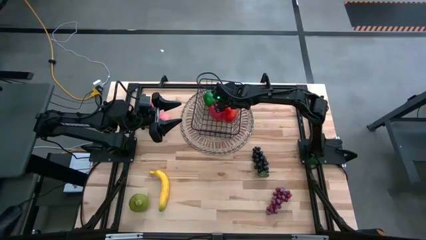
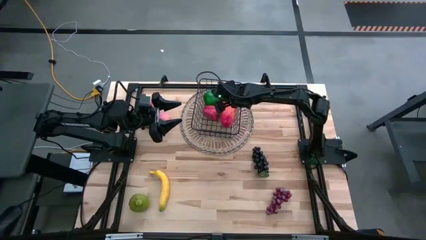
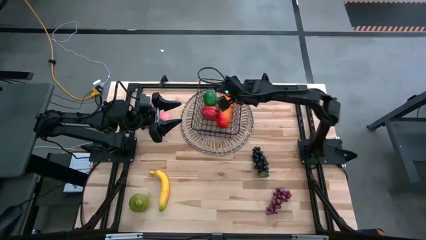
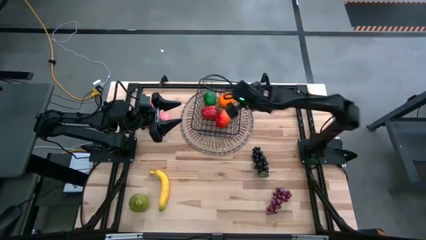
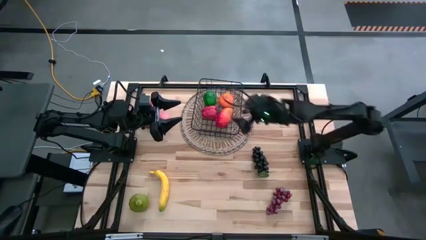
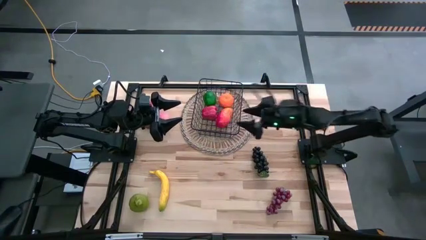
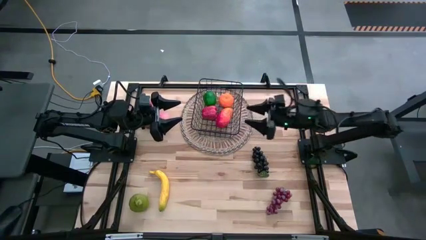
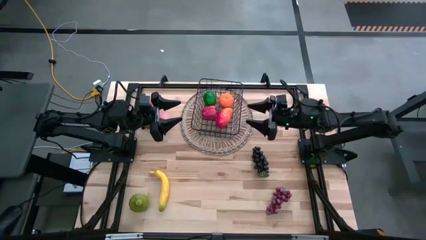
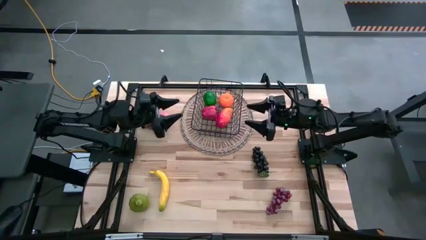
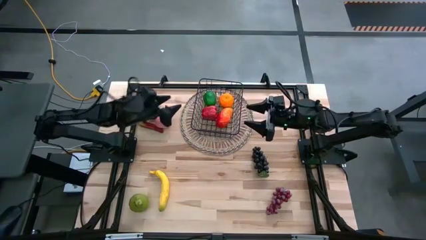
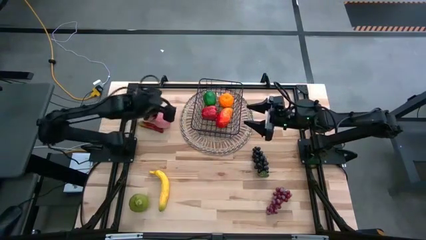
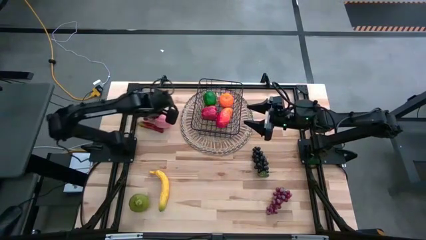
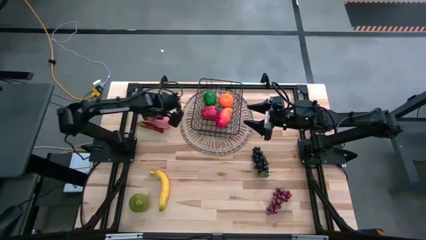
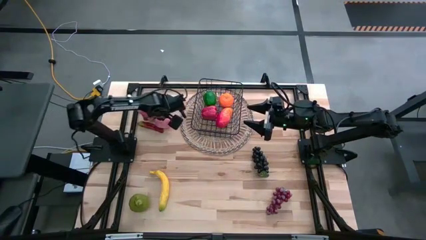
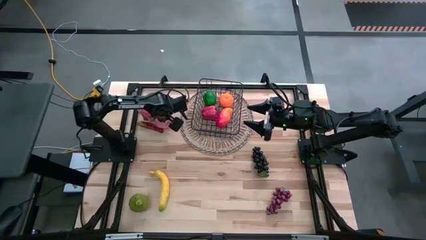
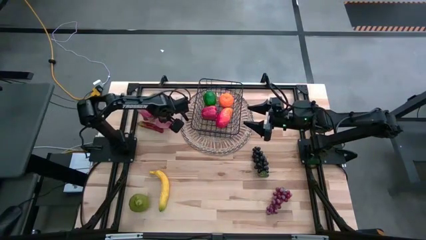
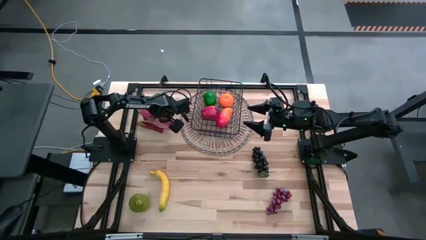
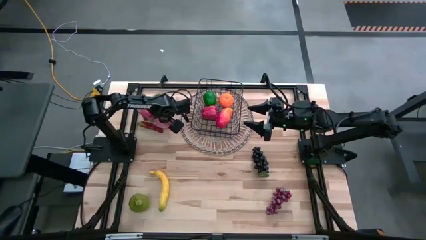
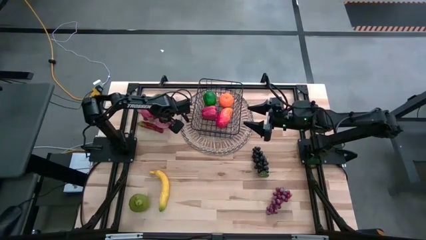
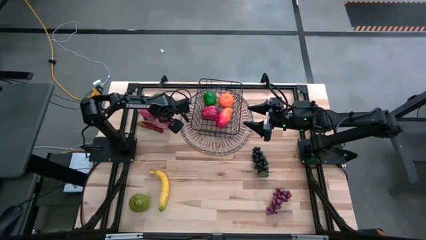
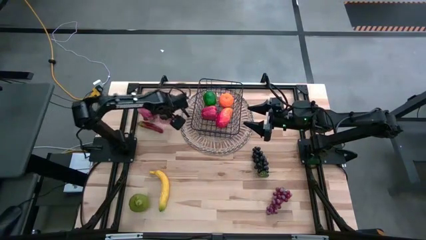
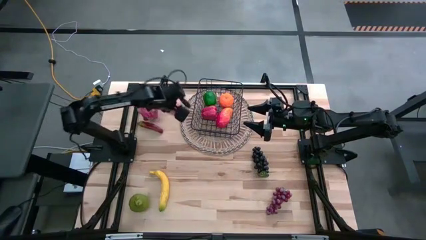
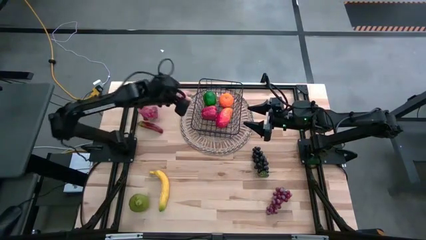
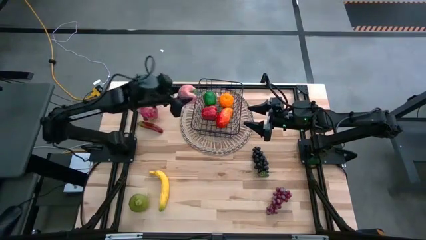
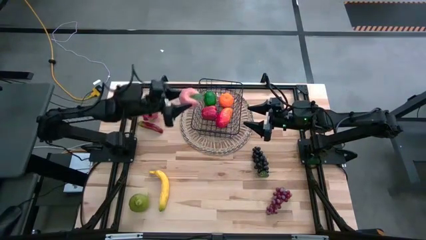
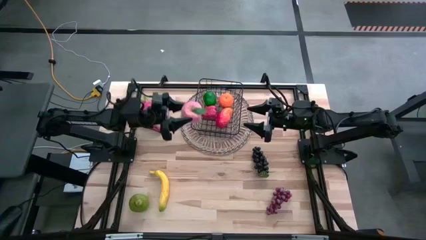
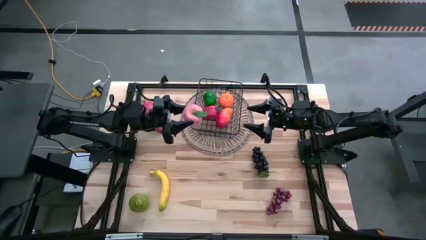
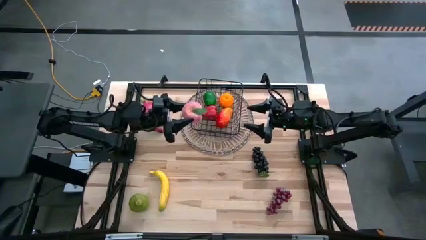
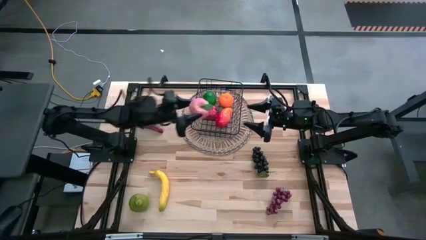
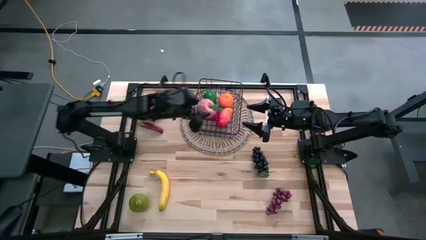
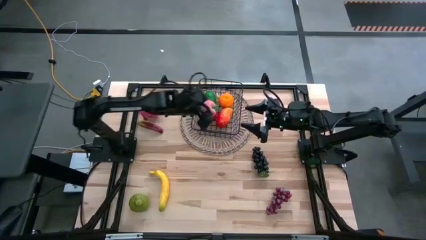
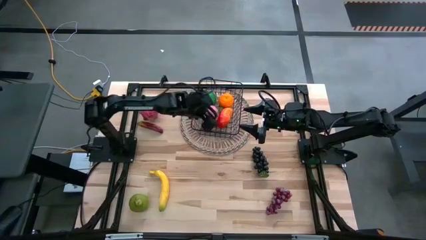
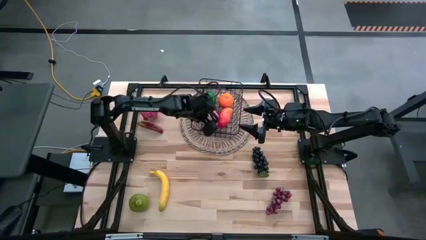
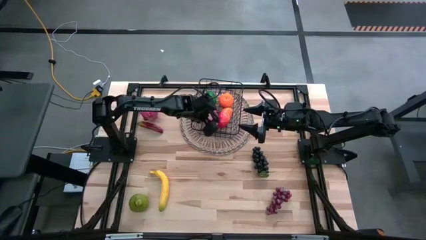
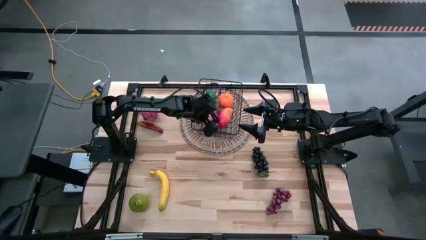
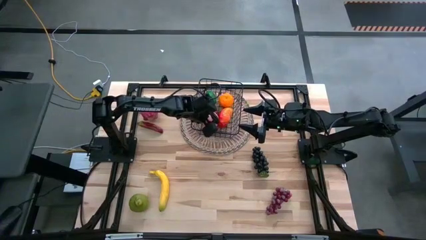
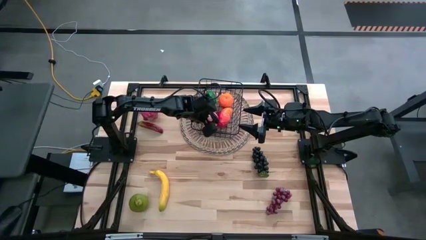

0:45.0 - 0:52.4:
Task: Build produce basket
Put the pink peach into the black wire basket

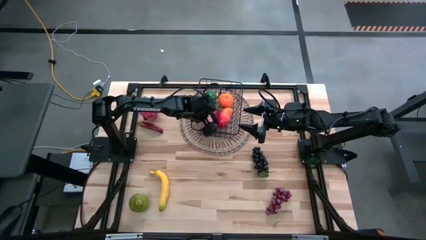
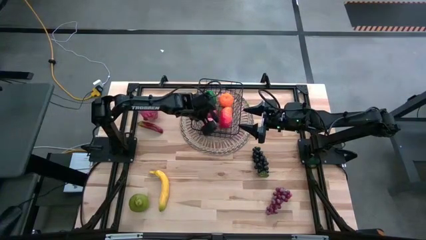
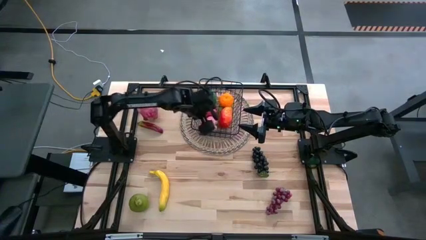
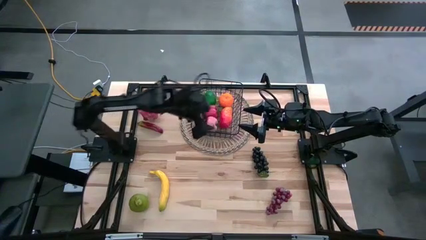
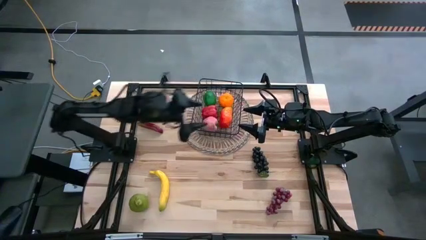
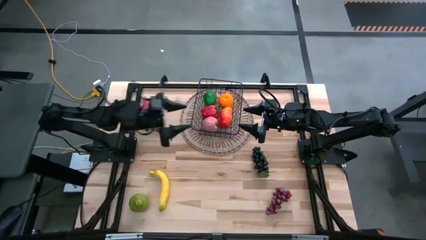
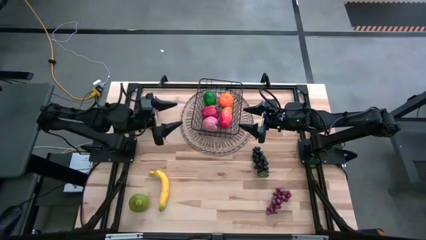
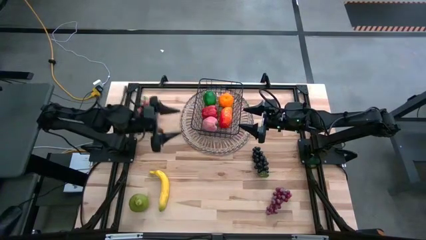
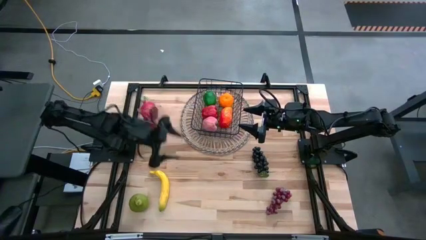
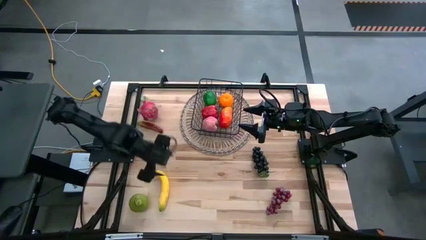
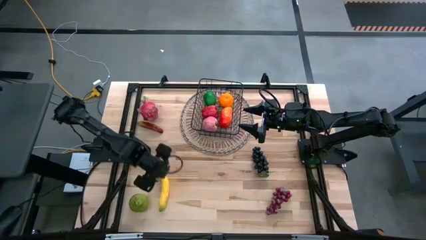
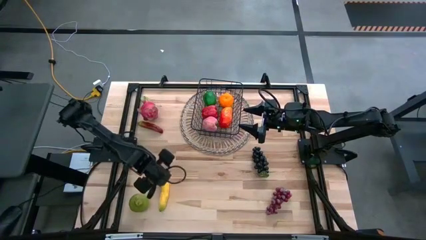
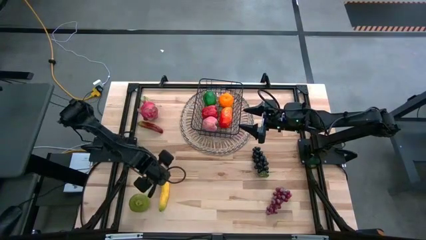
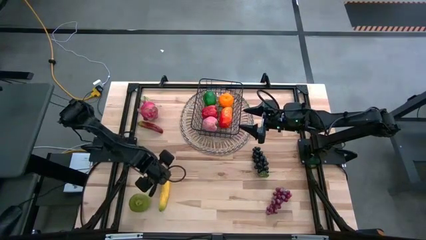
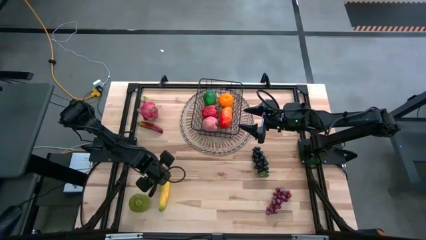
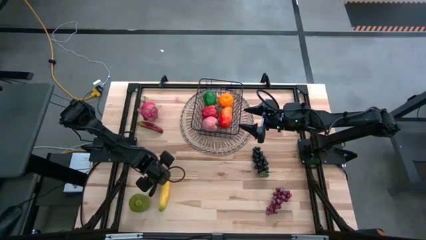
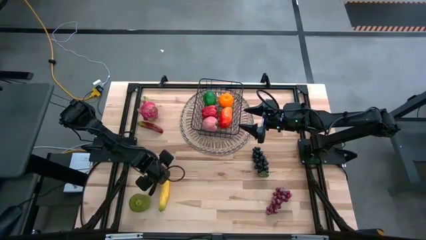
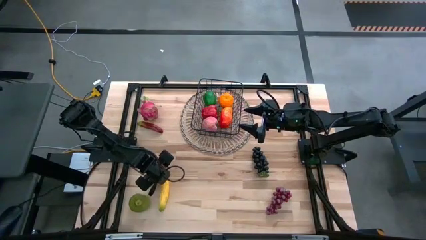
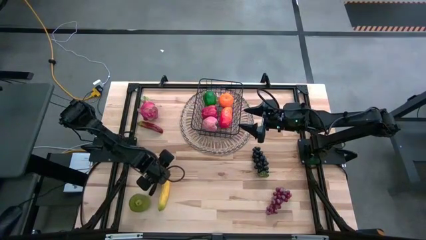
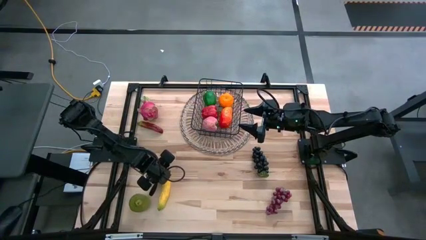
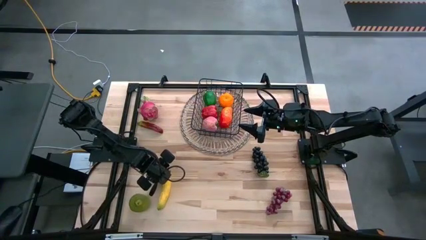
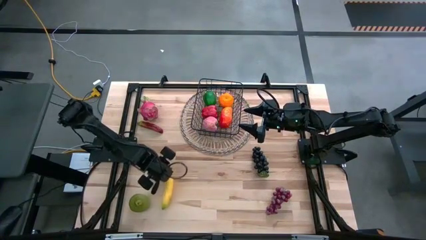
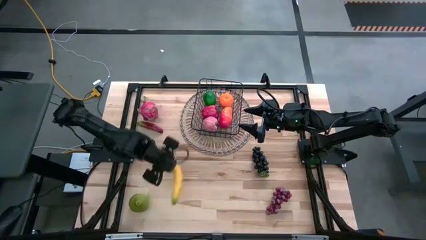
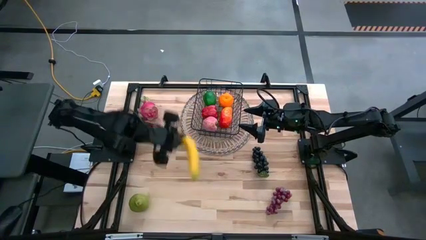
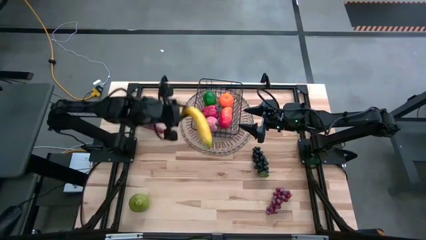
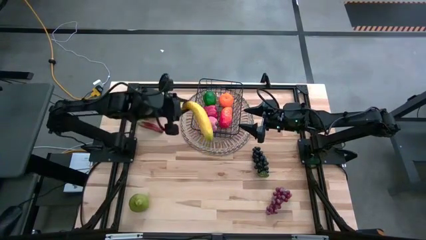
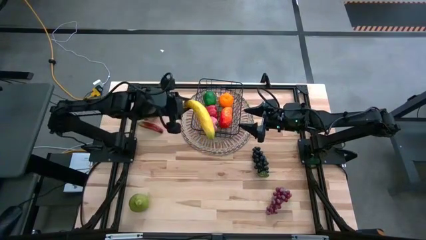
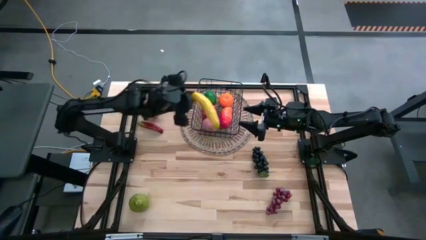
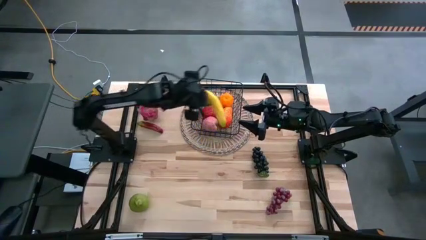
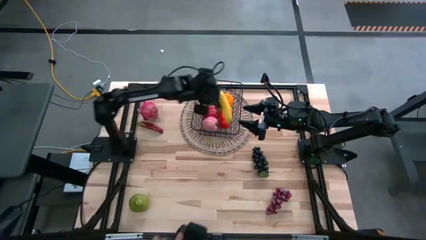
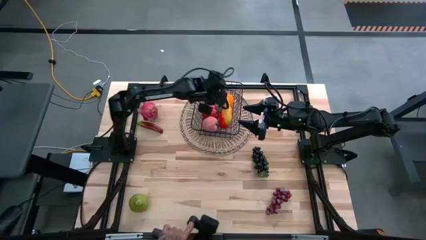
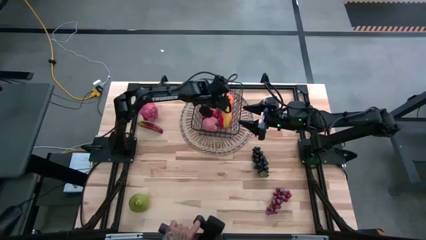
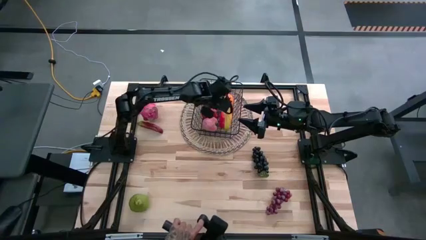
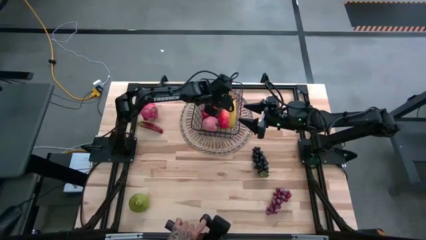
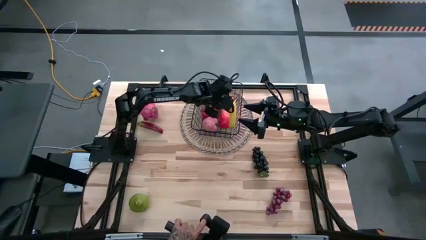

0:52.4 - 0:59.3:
Put the yellow banana into the black wire basket

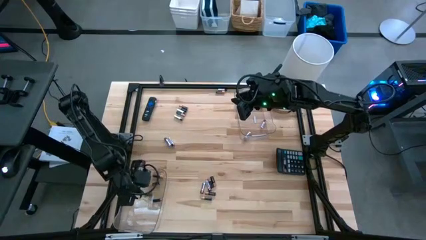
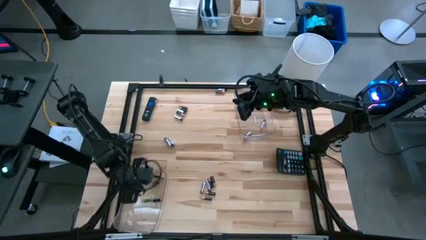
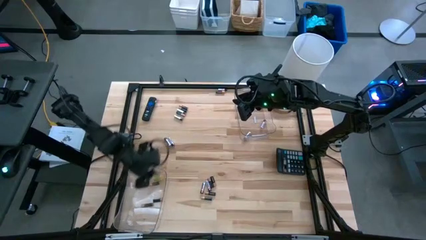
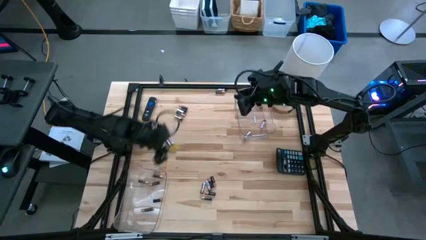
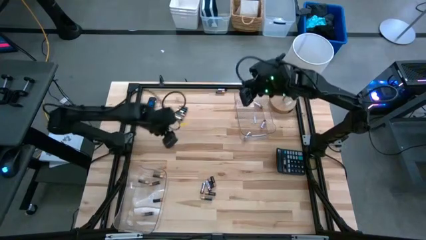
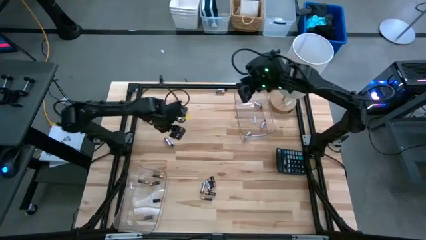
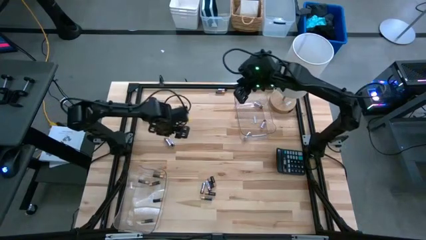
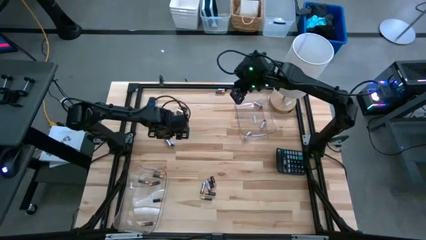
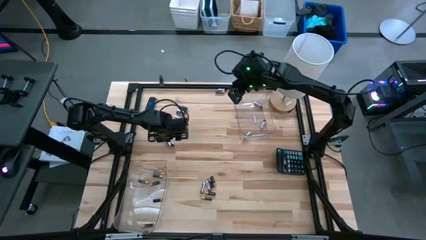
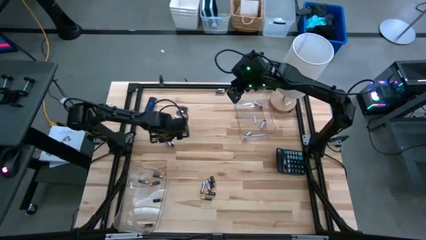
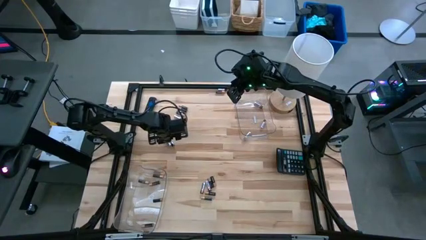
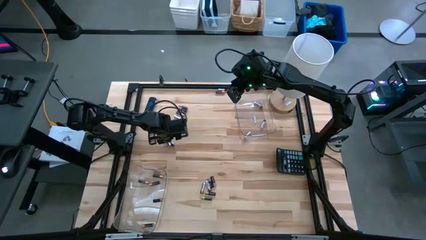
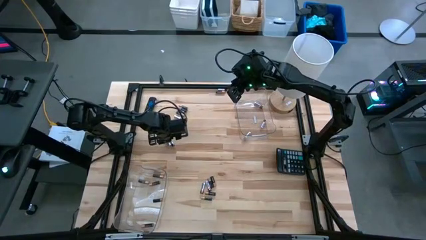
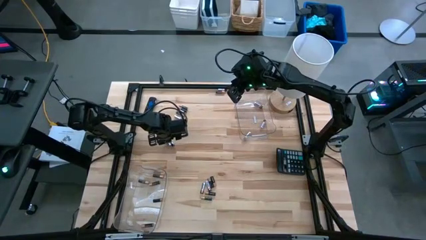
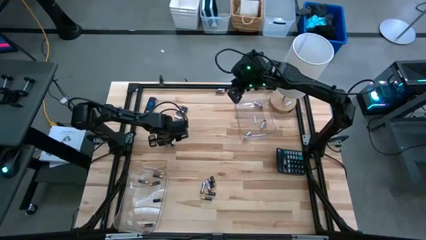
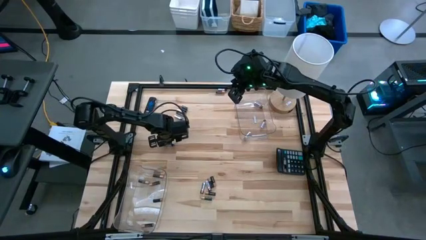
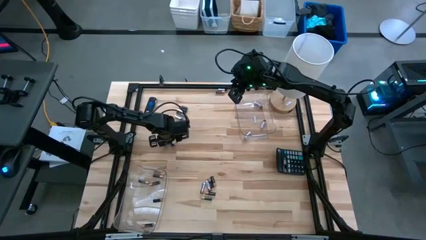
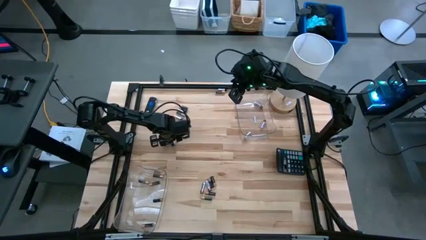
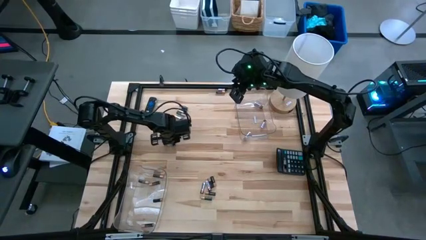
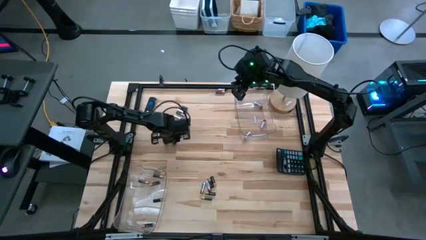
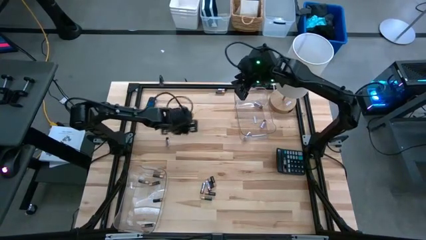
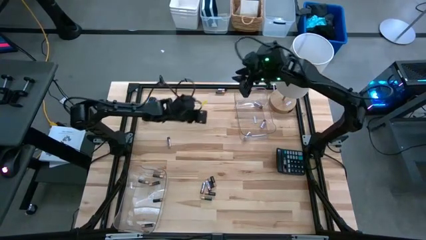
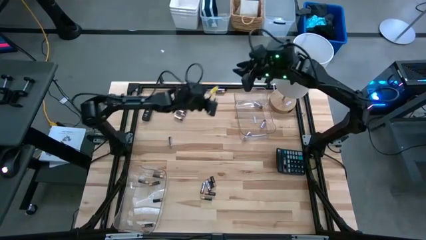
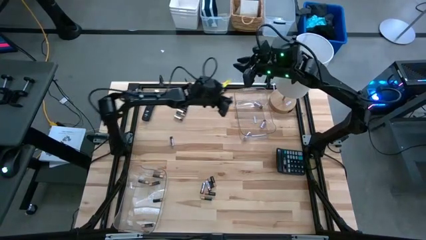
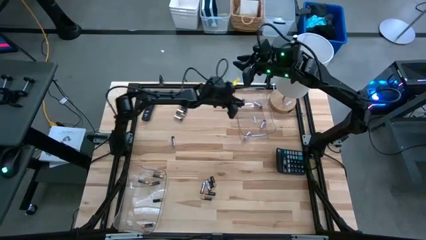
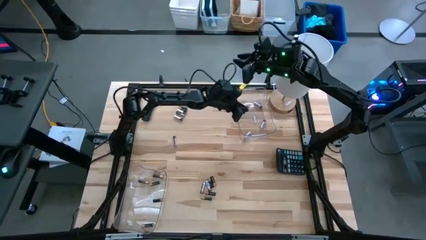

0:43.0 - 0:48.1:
Task: Sort batteries
Put the silver battery into the right transparent bin
